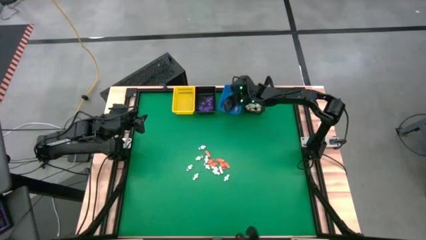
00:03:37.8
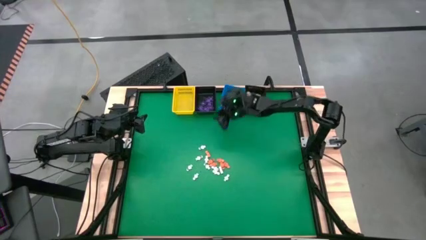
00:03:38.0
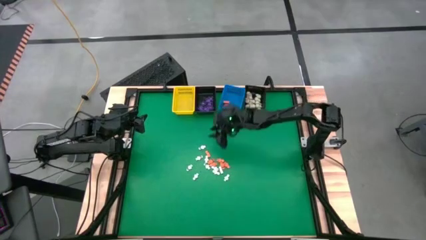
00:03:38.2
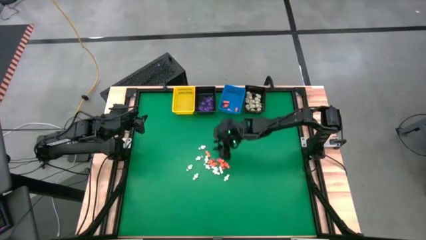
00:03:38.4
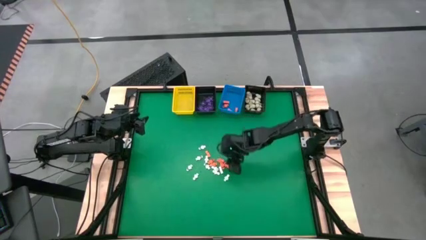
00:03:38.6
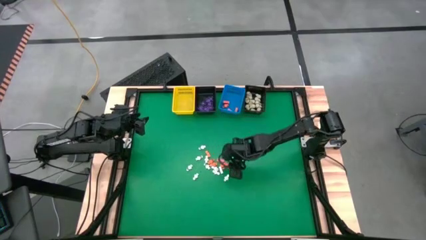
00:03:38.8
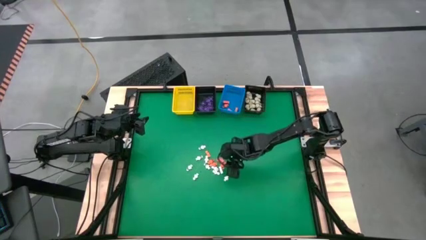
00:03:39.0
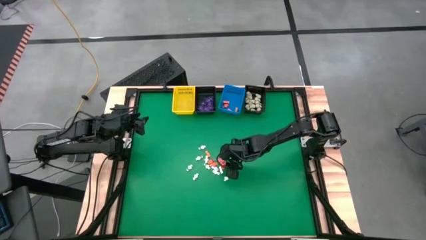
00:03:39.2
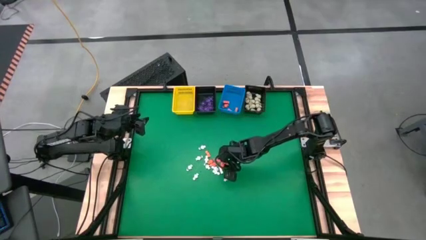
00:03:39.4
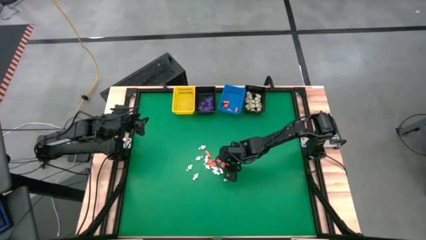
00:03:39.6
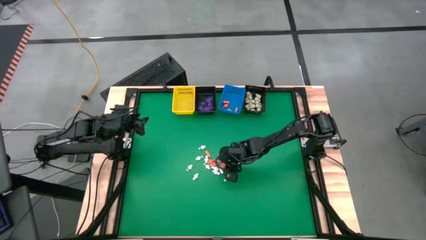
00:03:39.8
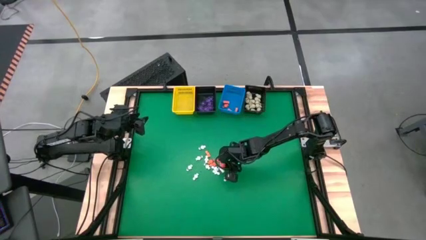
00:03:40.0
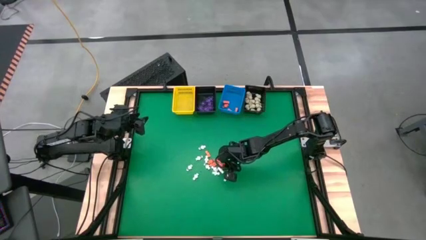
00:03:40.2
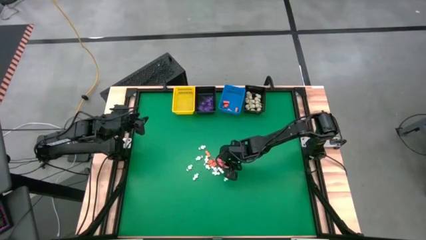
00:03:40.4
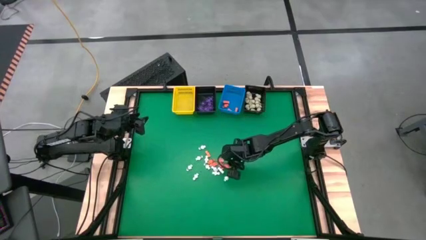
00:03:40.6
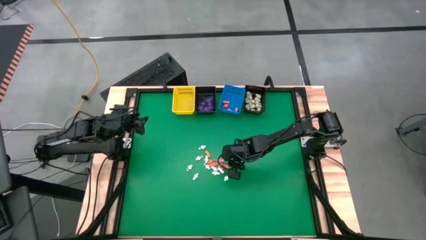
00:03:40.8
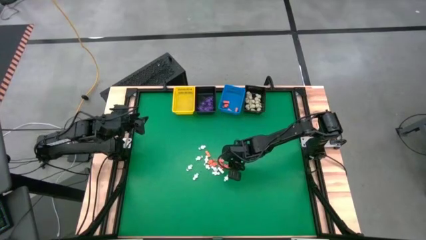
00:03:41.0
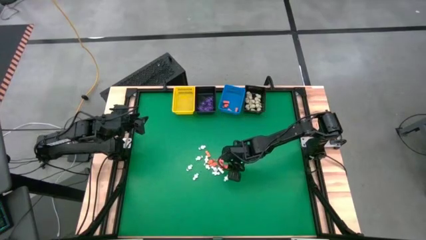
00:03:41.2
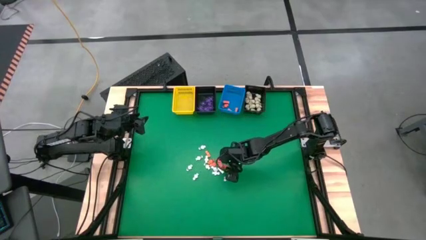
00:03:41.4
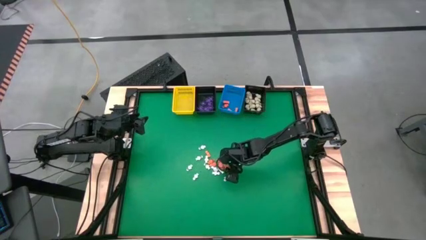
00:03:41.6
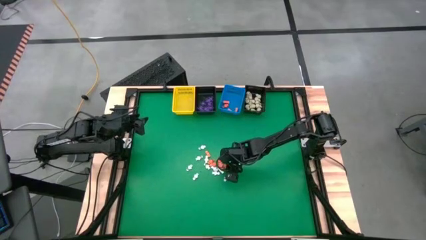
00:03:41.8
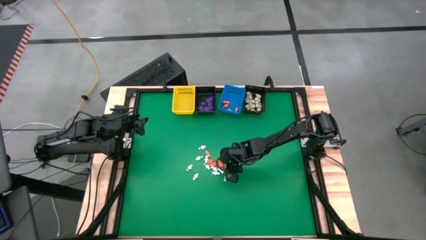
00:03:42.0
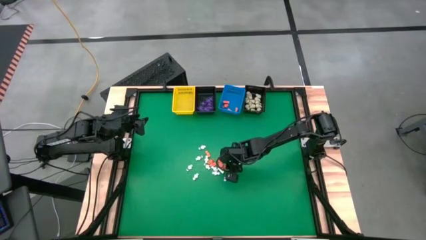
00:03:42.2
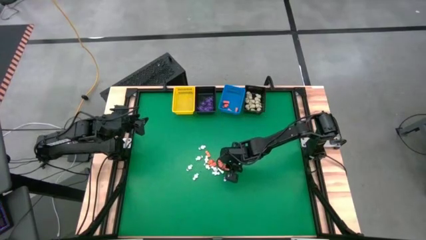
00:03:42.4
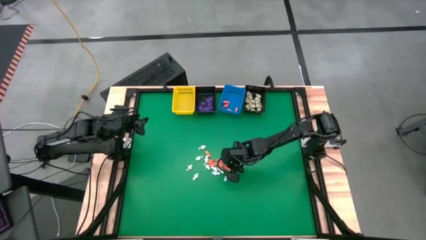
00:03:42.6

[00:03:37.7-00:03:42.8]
Task: Sort Halloween decoration
Put the orange skeleton toy into the blue basket

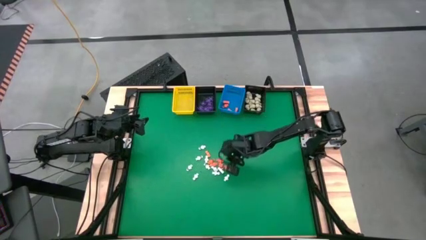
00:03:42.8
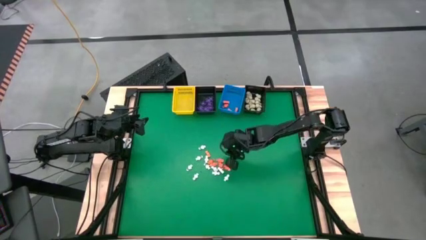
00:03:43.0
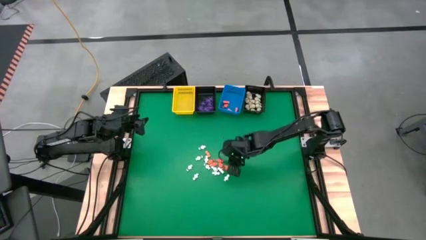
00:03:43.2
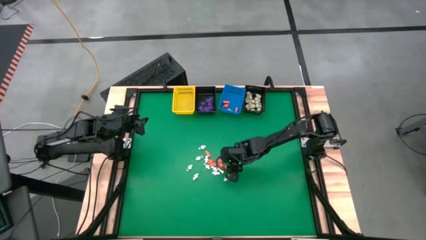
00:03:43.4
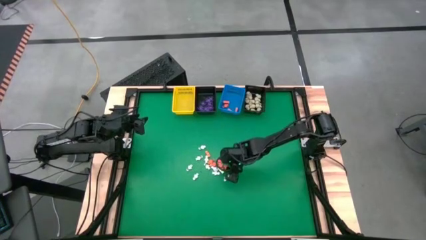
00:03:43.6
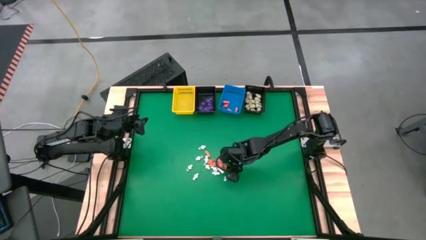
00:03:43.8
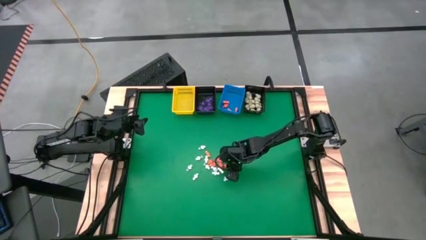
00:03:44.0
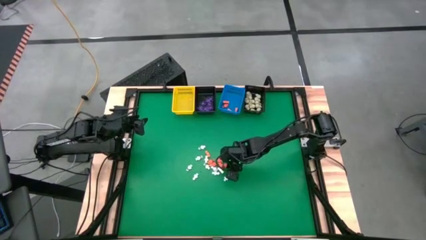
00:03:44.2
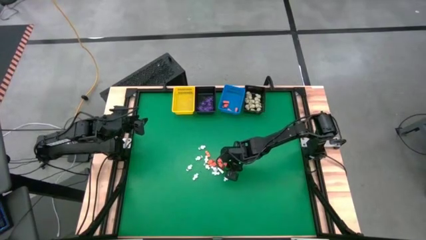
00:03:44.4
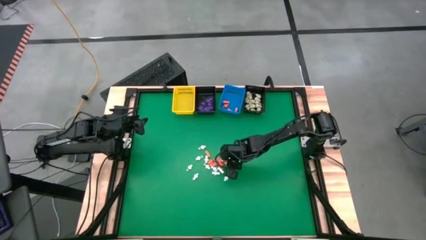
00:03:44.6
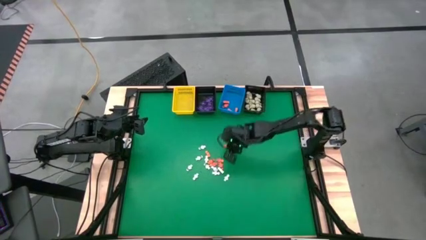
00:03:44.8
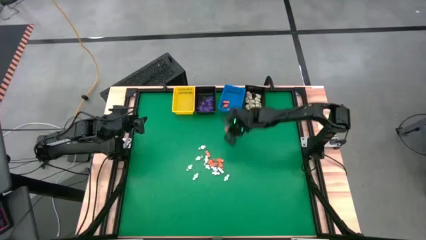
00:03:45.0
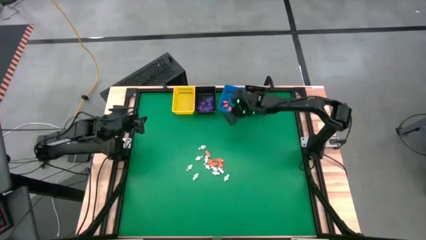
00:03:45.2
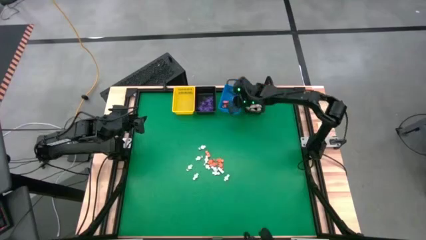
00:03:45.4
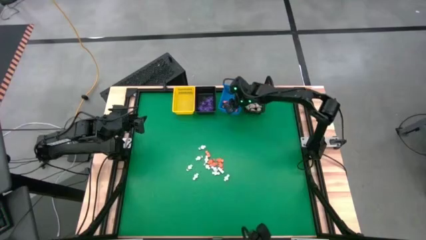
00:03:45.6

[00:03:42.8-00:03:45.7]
Put the orange skeleton toy into the blue basket

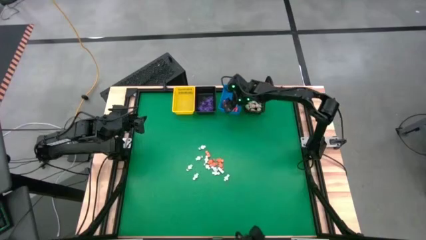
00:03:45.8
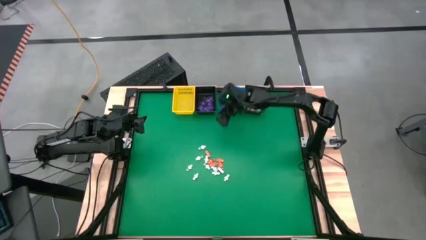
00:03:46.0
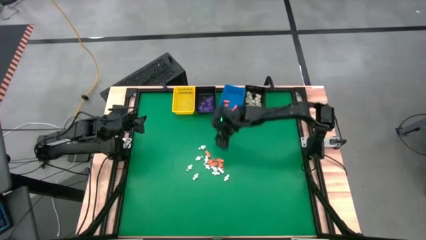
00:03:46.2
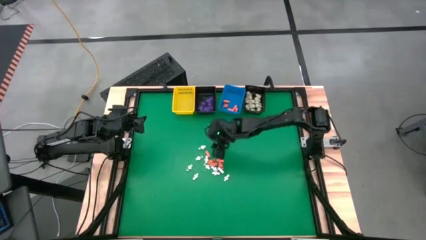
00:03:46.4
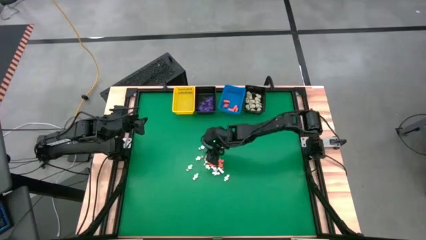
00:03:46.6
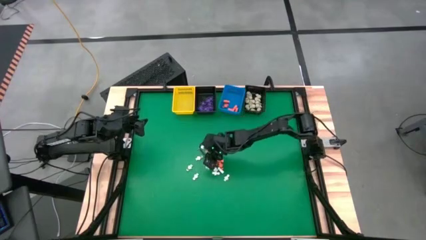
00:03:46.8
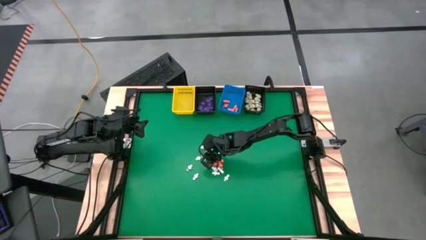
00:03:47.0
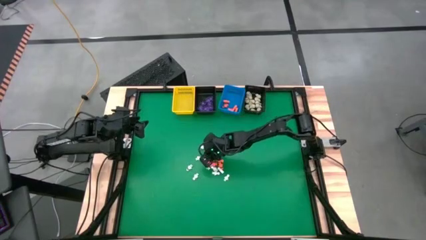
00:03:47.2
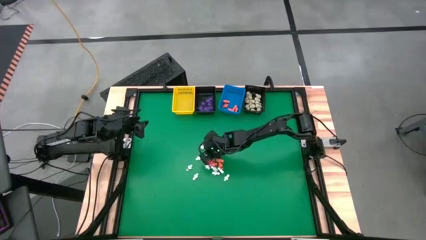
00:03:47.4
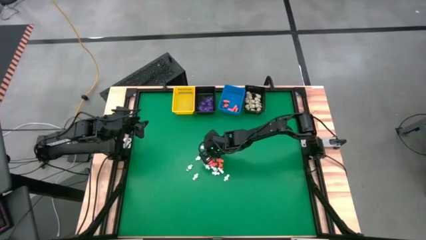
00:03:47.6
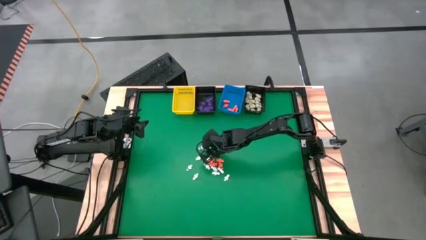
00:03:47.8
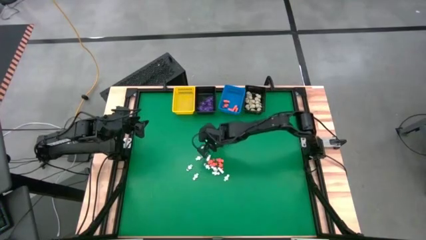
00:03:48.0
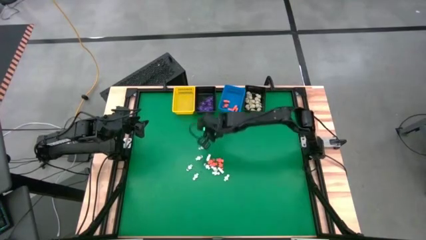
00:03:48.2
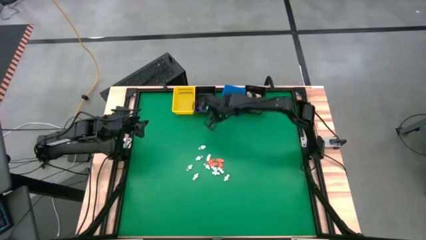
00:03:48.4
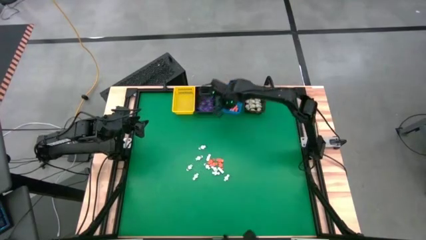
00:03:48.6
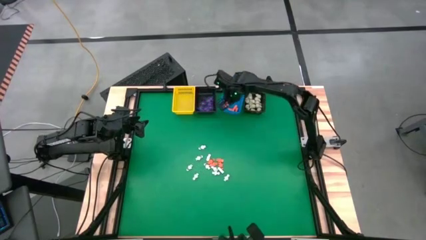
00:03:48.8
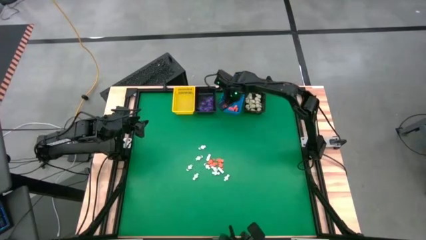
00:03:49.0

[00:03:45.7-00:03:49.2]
Put the orange skeleton toy into the blue basket

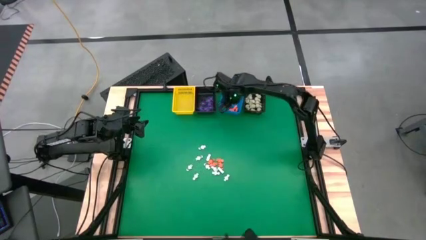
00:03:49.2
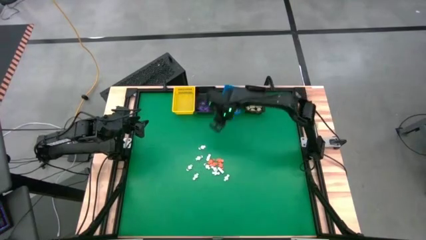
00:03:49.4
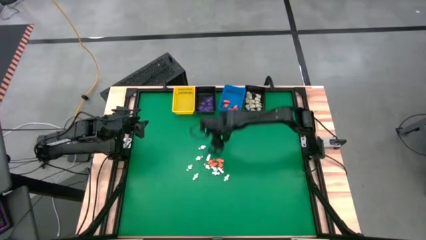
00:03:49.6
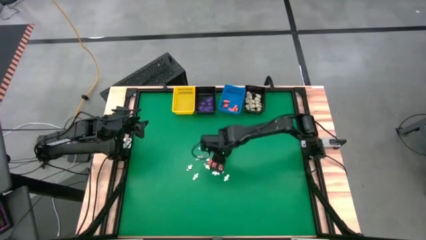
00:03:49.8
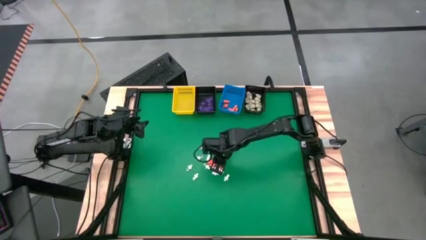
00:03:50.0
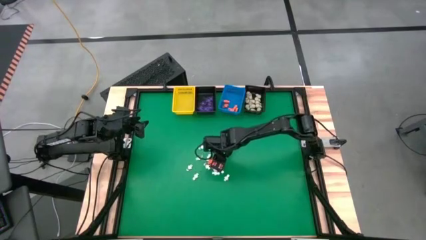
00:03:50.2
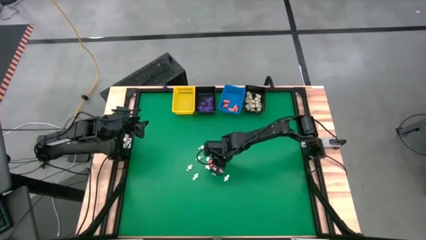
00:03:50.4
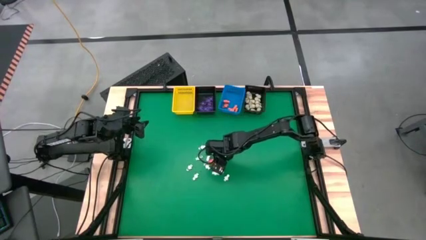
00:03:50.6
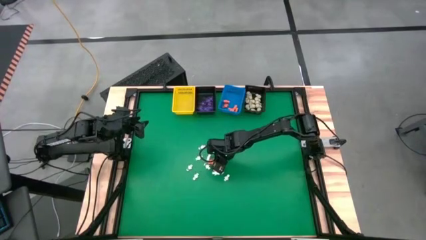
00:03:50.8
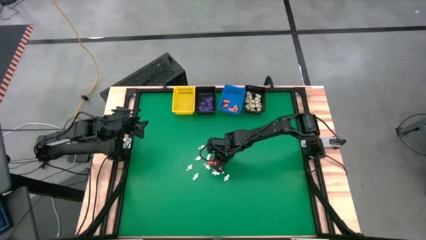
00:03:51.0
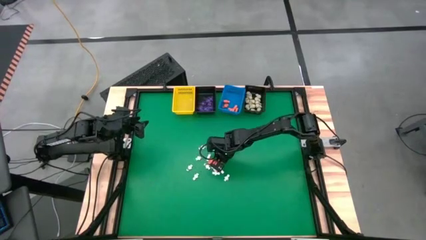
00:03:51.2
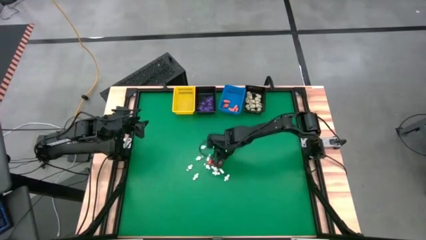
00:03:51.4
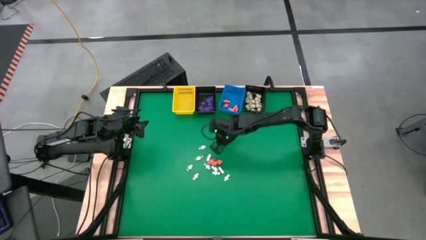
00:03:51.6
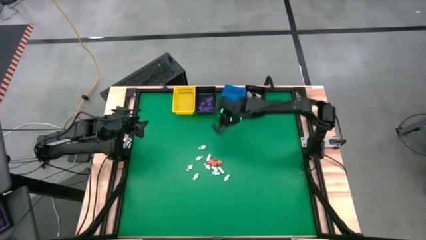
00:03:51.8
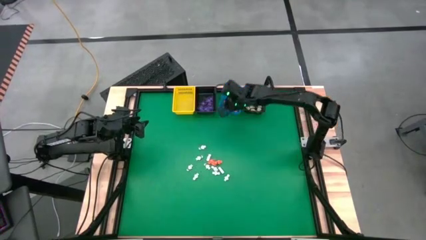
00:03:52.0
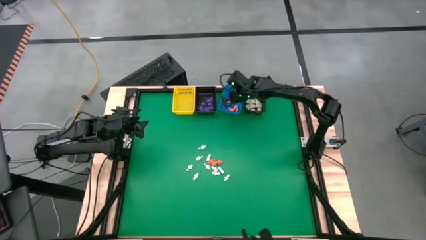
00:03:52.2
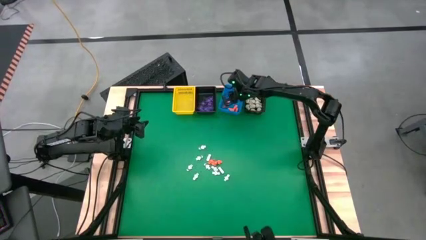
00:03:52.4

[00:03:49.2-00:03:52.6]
Put the orange skeleton toy into the blue basket

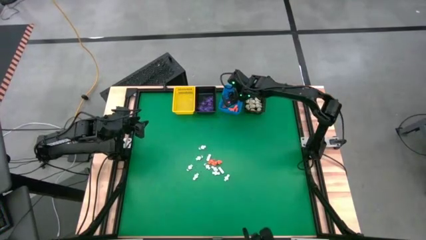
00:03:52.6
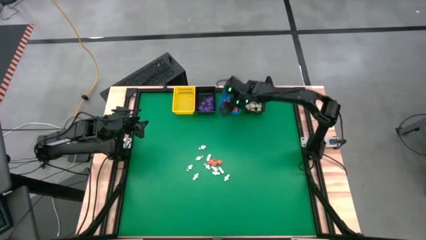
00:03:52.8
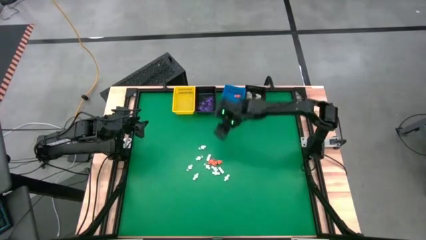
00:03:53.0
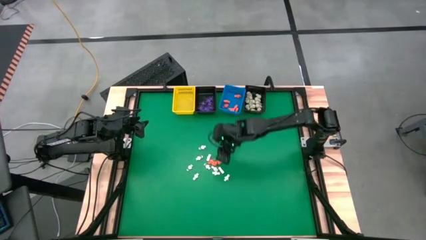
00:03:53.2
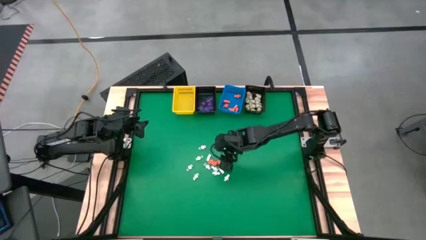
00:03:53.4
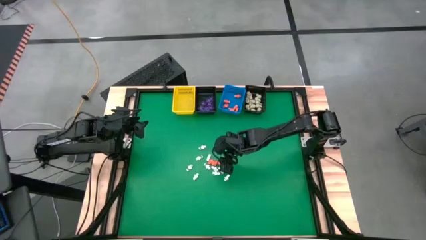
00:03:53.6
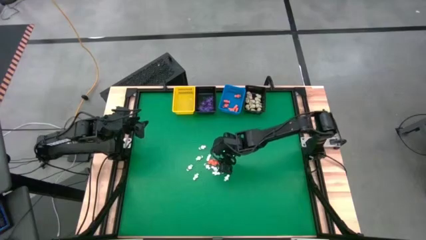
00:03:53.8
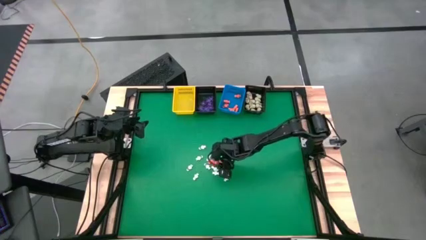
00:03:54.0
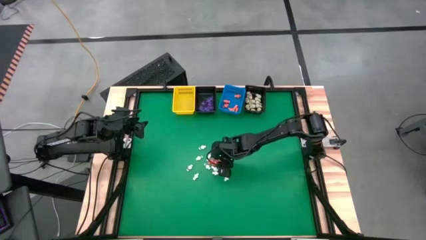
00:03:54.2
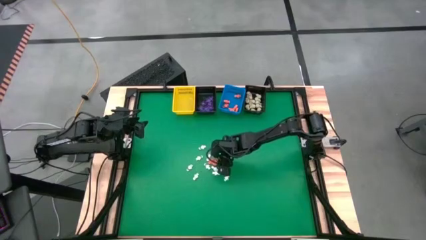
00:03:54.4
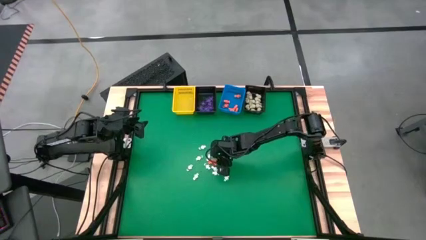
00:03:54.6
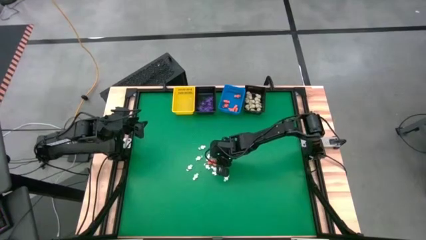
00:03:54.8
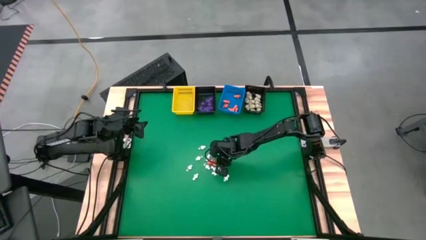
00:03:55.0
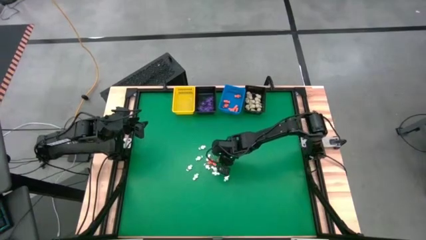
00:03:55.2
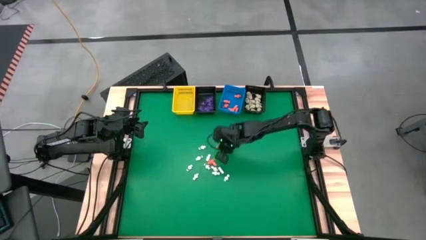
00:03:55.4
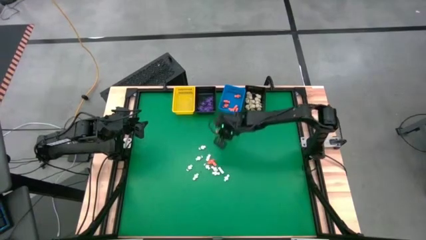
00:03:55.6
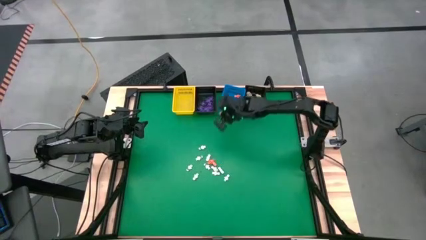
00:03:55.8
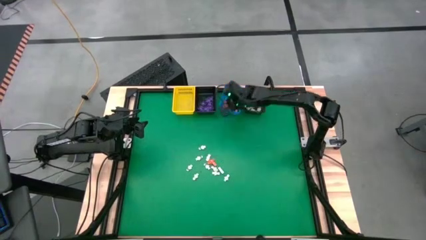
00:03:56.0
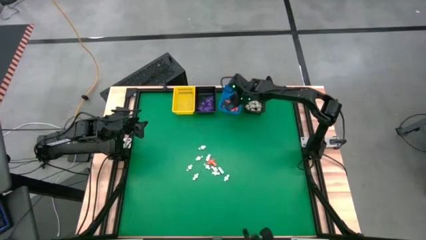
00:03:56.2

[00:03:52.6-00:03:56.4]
Put the orange skeleton toy into the blue basket
